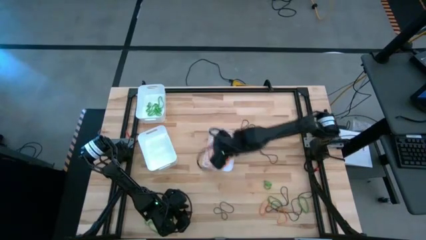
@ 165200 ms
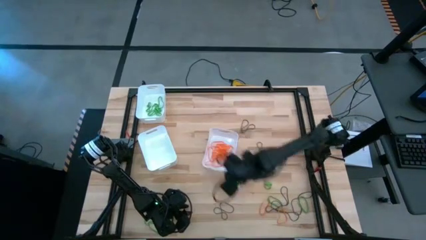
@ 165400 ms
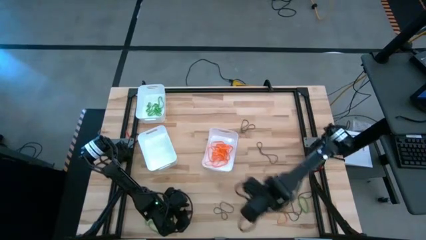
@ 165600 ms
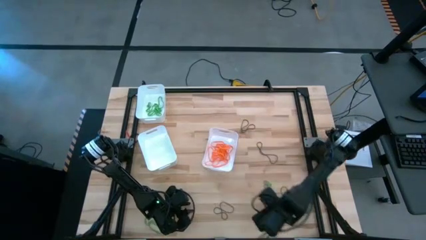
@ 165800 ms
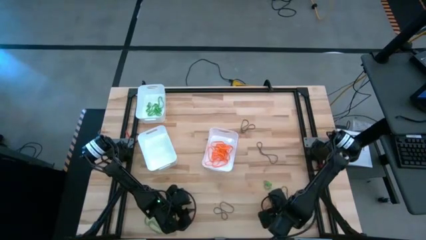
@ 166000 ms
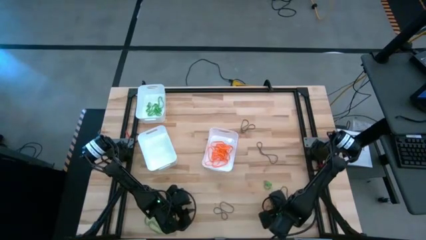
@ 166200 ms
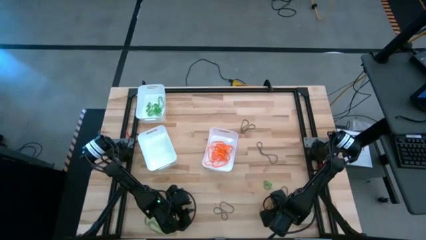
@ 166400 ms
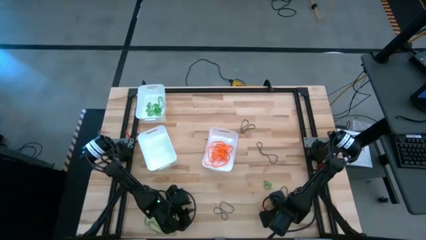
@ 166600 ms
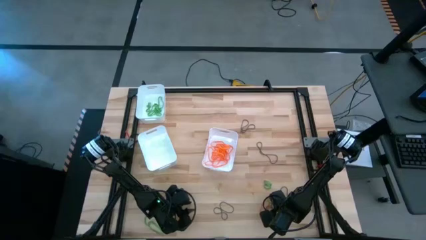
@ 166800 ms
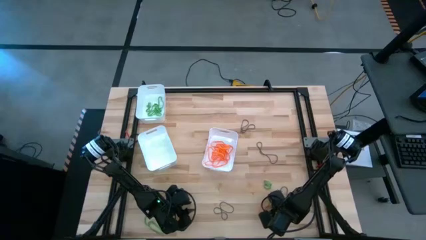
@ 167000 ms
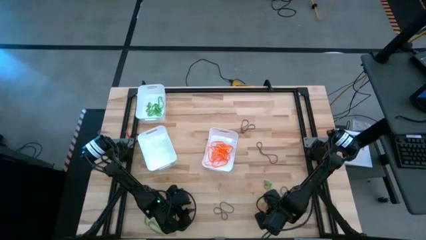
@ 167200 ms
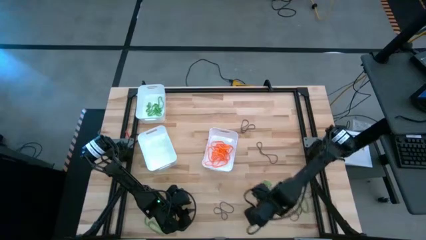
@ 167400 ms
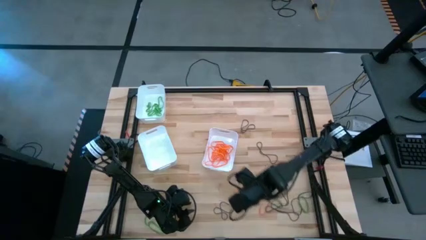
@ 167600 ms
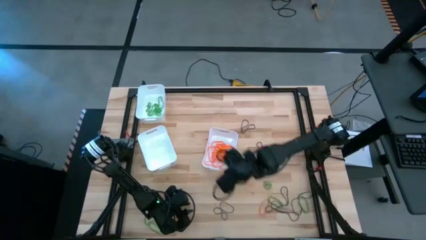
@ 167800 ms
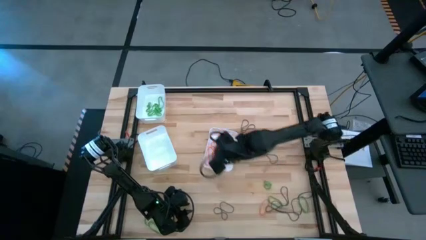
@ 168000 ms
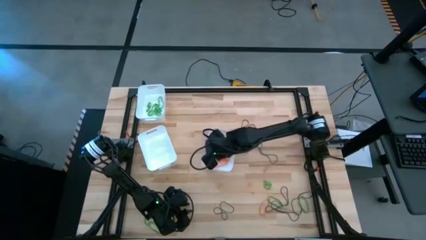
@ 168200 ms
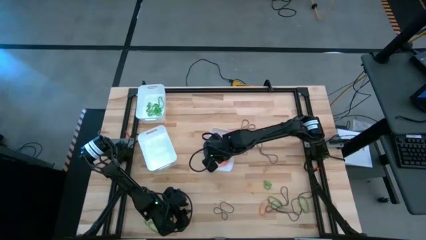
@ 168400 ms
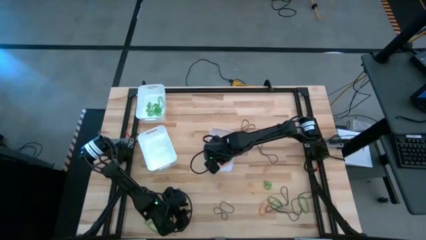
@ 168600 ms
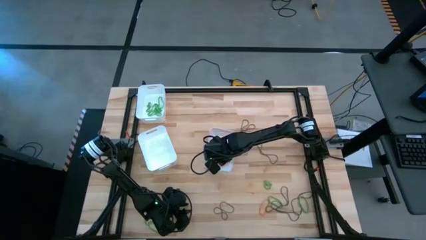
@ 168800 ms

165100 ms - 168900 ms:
Task: Sort rubber bands into baskets
Put the orange rubber band into the bottom right white bin

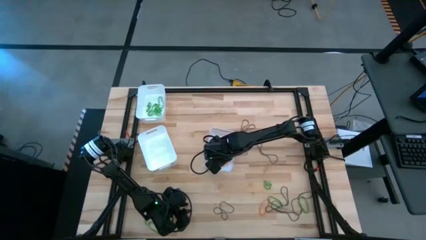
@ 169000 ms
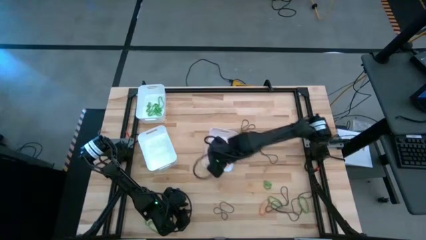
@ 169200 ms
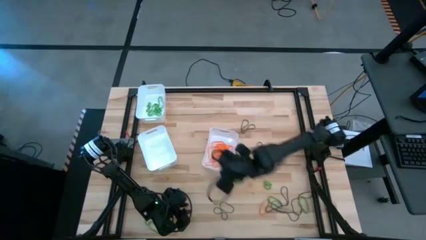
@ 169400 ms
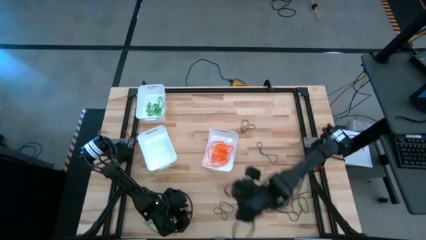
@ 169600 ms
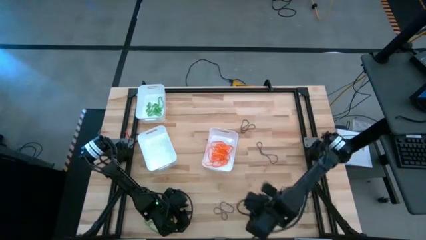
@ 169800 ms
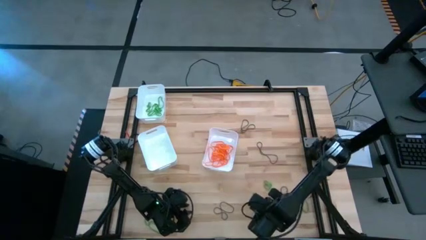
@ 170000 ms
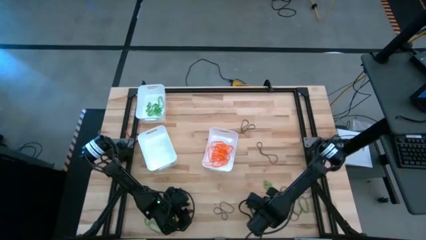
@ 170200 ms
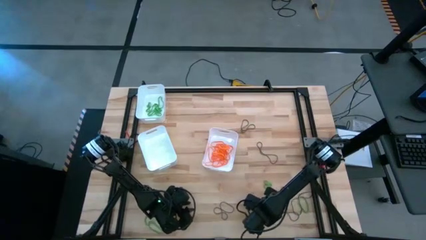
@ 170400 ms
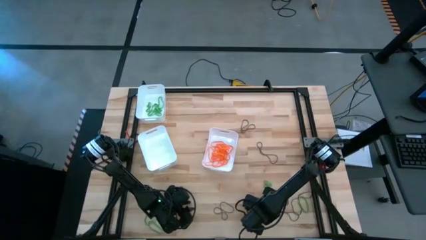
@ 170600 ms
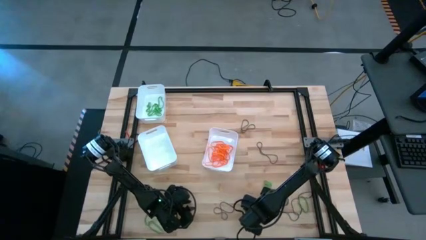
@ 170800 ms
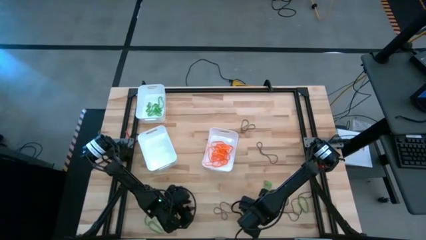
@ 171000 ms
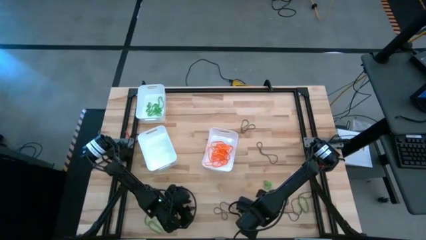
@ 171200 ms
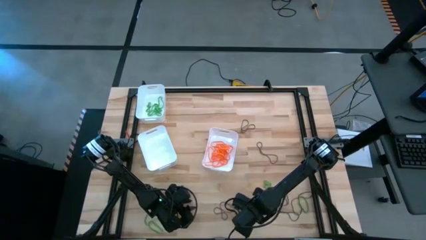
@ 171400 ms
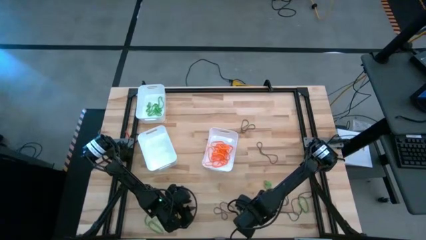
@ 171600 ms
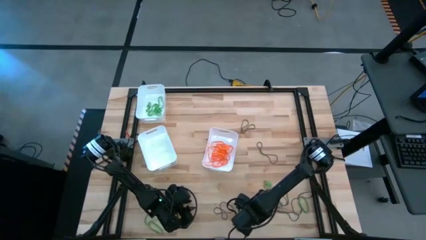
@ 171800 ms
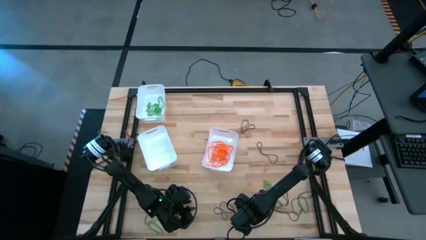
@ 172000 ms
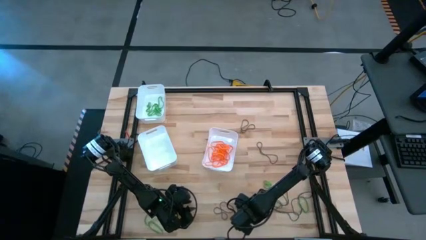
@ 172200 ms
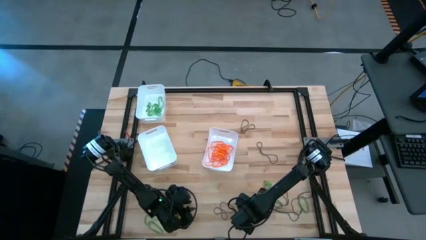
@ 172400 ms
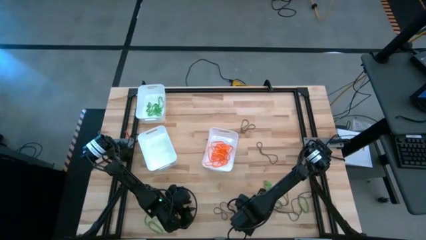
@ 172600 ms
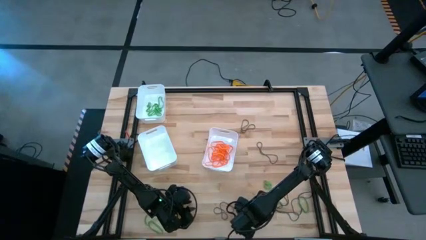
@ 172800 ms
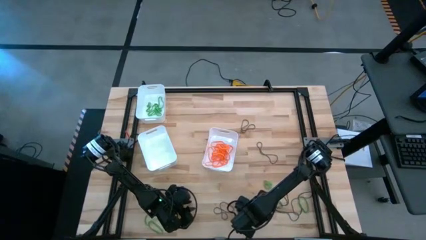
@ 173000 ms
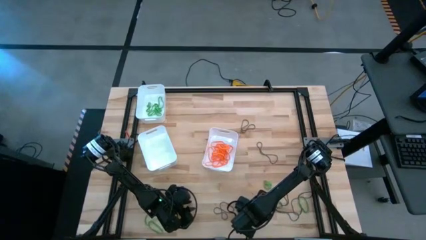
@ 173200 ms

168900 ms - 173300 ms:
Put the orange rubber band into the bottom right white bin

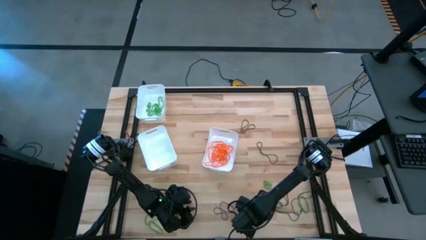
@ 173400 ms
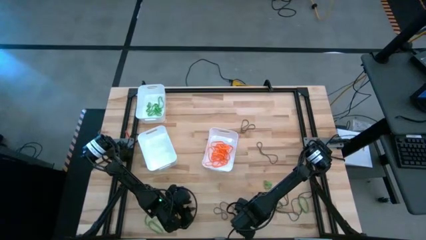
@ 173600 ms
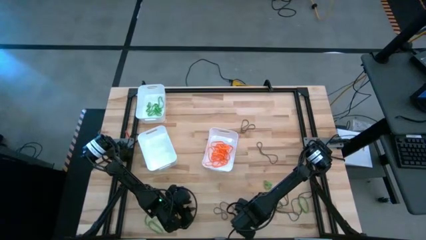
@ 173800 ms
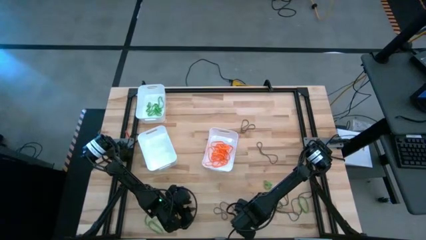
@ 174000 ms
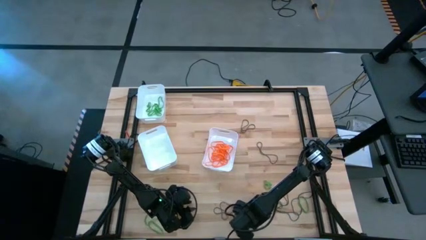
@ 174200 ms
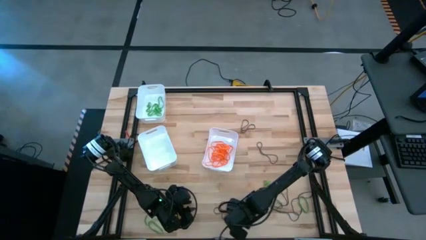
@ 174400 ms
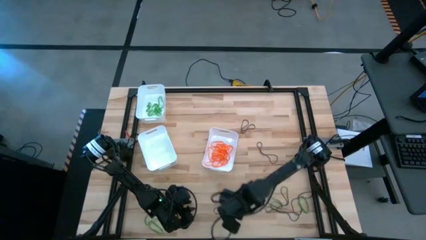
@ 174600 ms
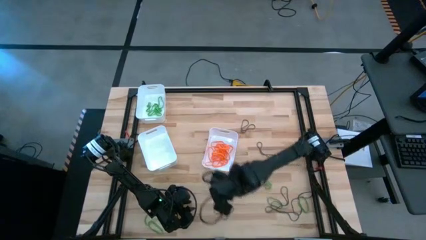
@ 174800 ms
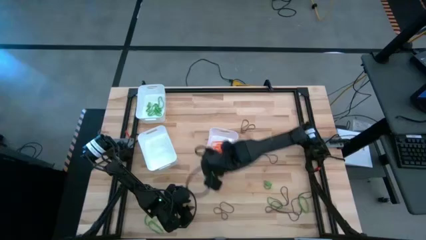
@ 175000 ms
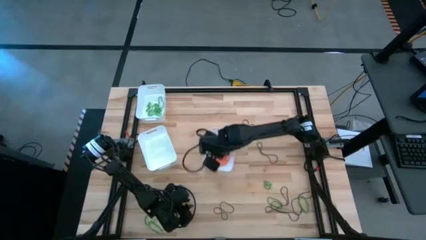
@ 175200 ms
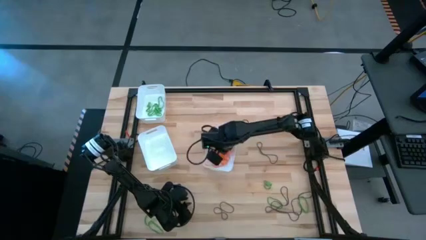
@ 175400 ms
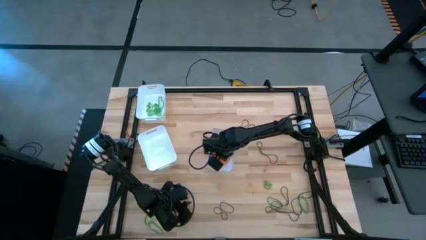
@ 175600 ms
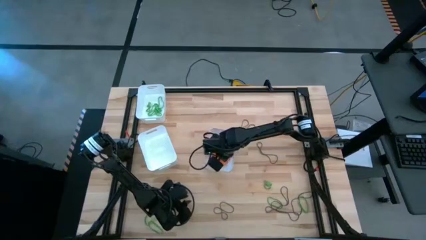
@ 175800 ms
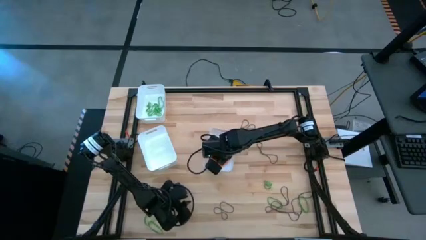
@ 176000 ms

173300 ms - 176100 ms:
Put the orange rubber band into the bottom right white bin

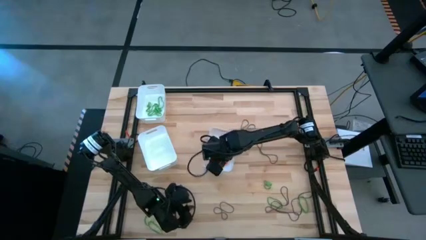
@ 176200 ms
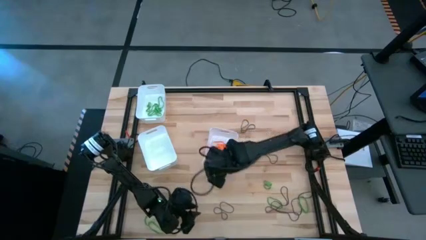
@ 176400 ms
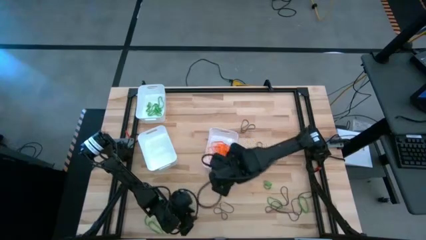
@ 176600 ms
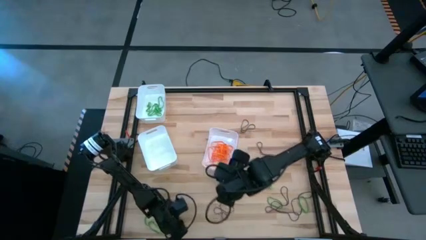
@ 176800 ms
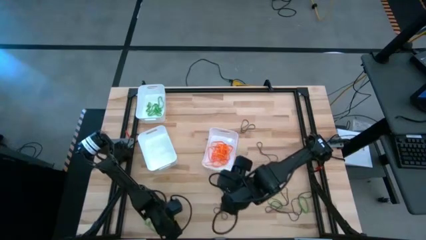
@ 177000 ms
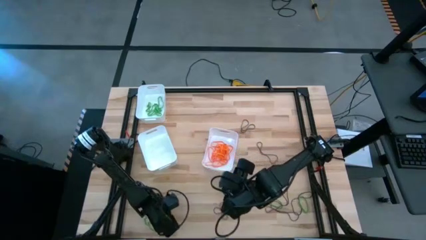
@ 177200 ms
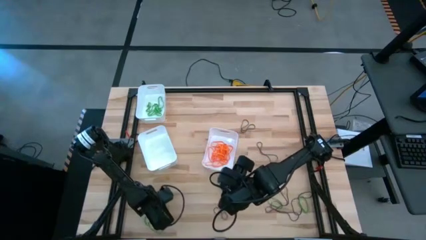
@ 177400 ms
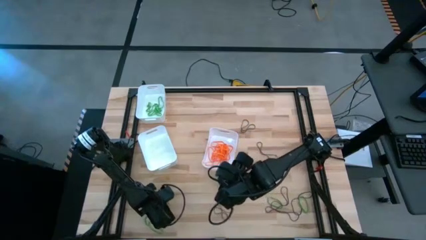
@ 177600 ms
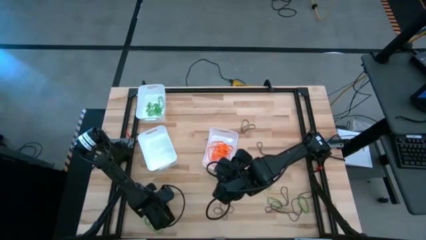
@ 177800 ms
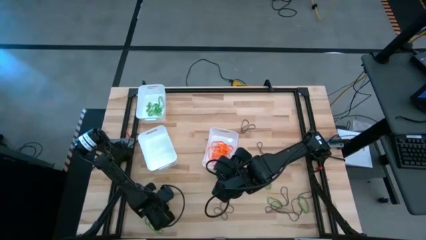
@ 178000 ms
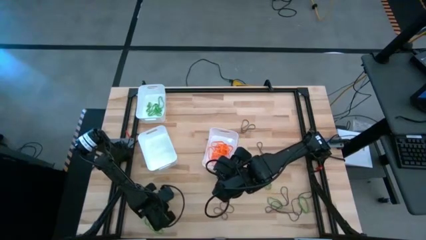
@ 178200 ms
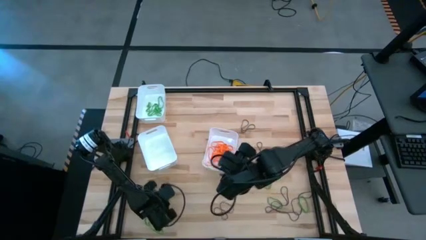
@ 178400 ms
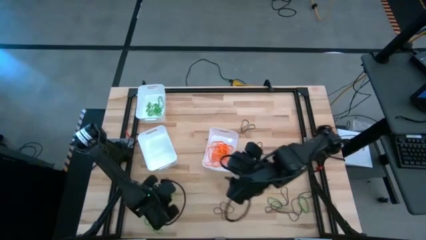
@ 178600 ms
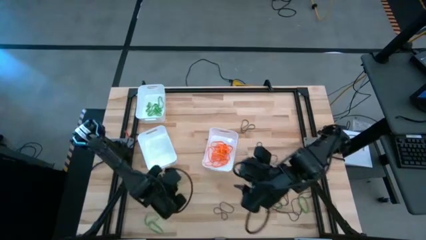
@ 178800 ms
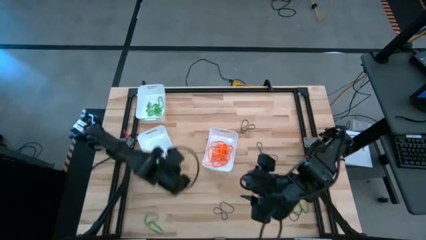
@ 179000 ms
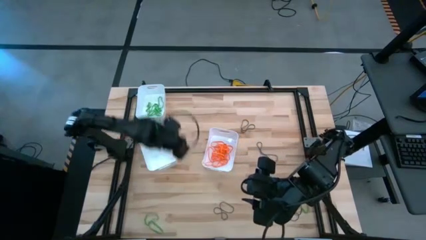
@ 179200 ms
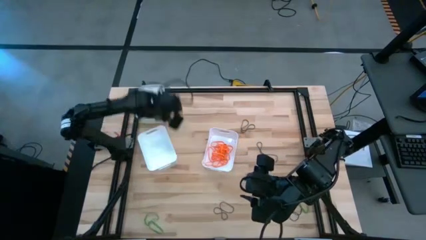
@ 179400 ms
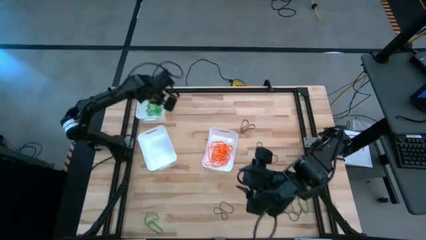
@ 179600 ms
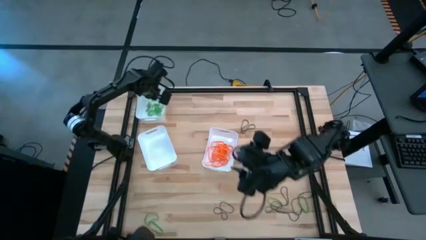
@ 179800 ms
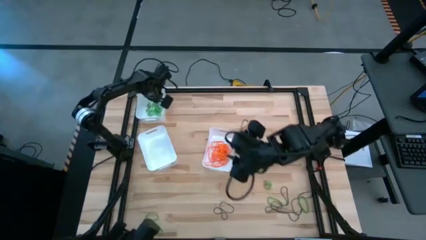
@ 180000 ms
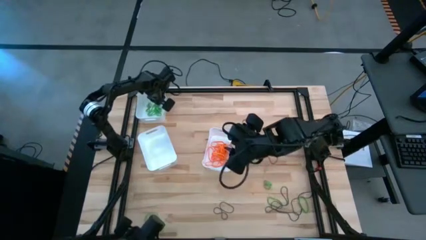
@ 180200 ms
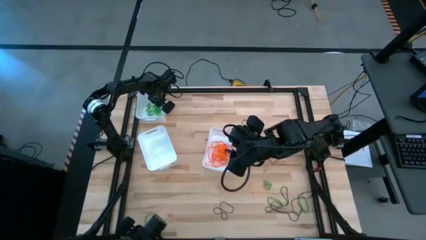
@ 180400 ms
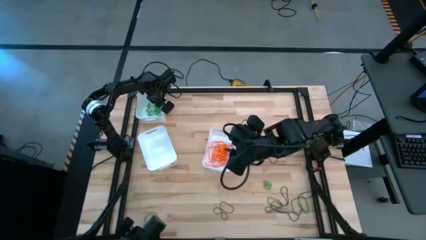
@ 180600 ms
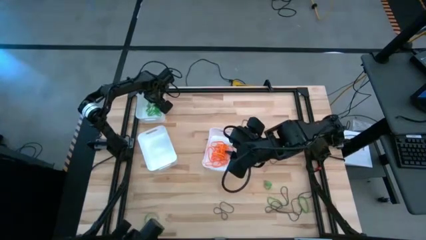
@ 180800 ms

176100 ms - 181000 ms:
Put the green rubber band into the top white bin
